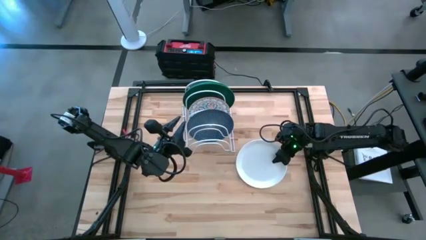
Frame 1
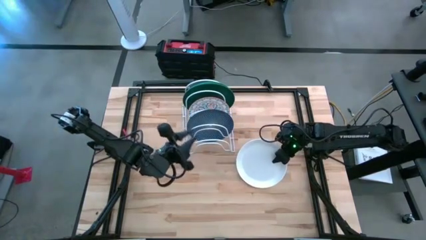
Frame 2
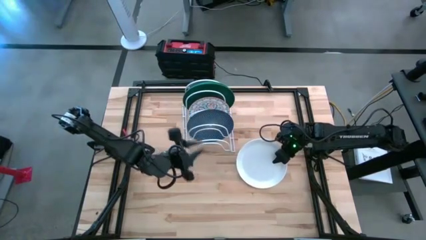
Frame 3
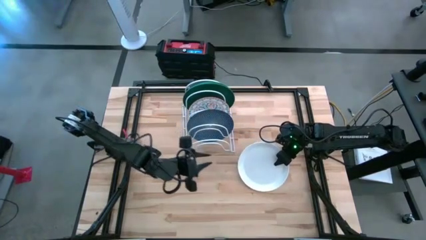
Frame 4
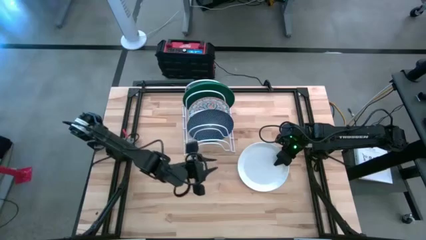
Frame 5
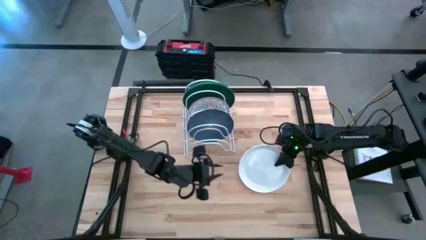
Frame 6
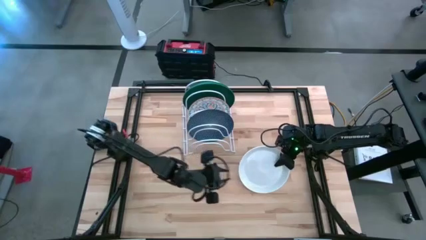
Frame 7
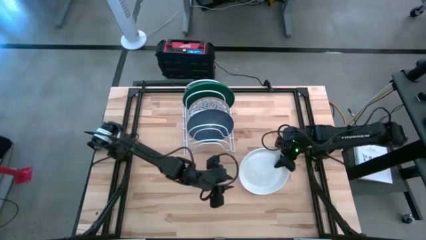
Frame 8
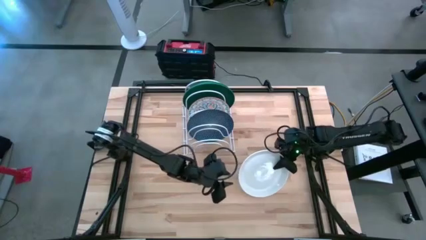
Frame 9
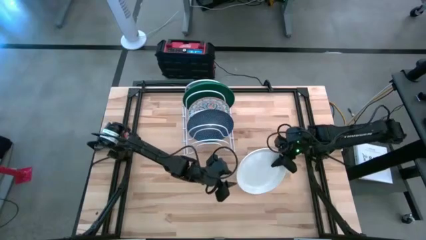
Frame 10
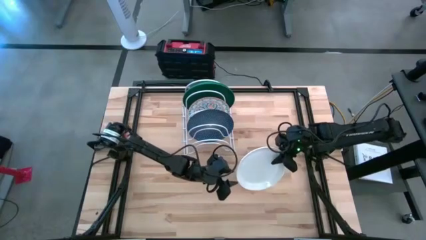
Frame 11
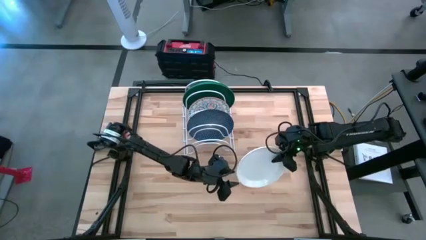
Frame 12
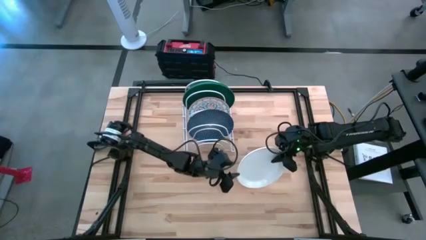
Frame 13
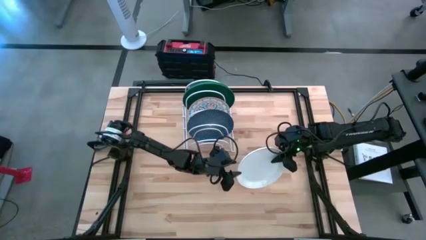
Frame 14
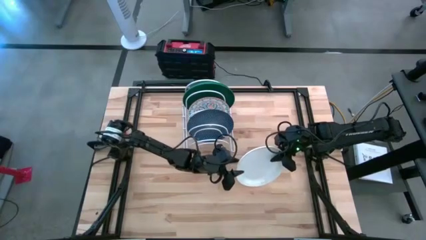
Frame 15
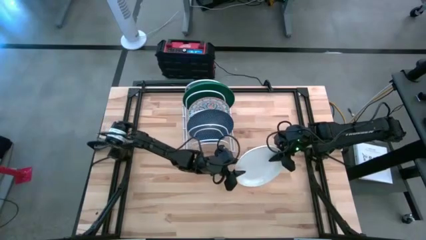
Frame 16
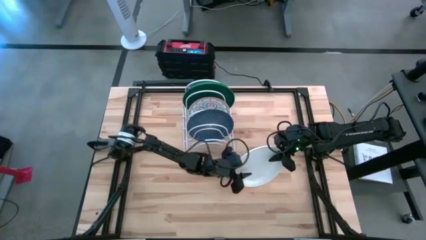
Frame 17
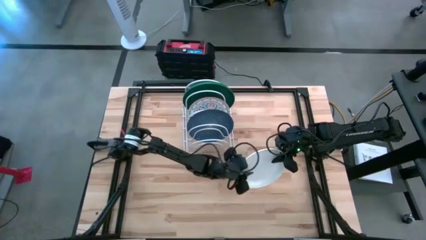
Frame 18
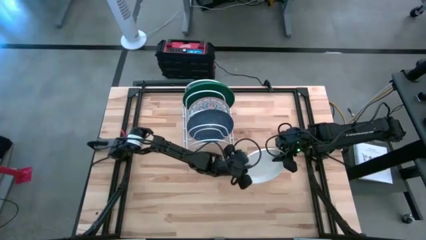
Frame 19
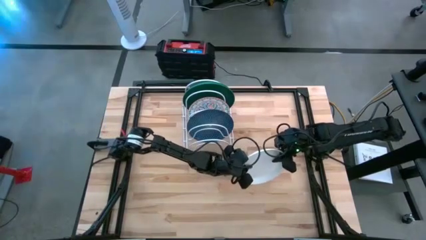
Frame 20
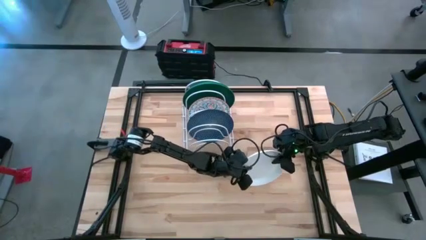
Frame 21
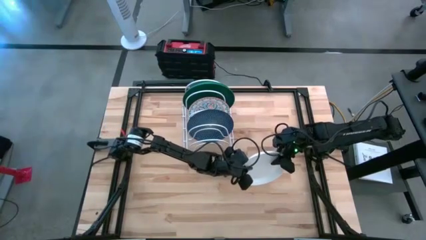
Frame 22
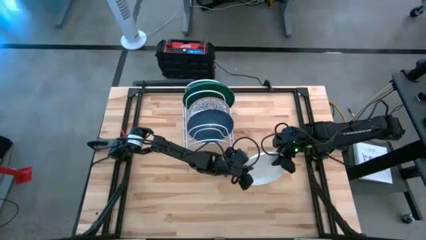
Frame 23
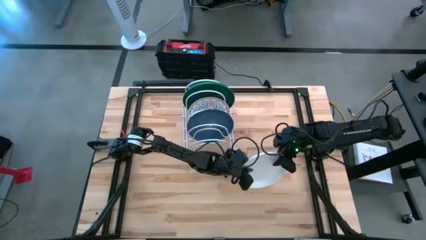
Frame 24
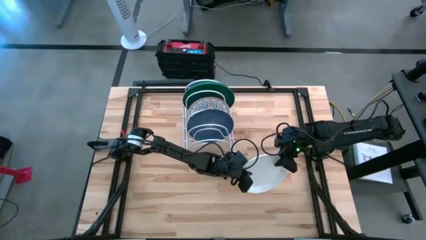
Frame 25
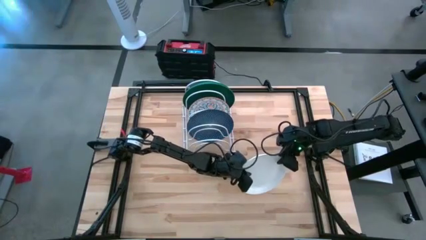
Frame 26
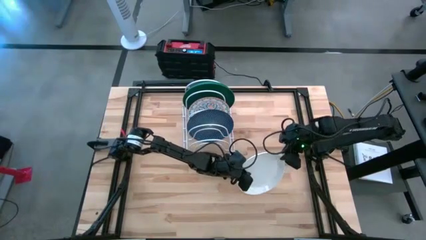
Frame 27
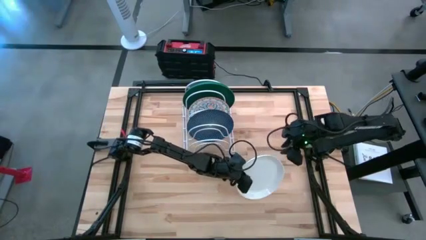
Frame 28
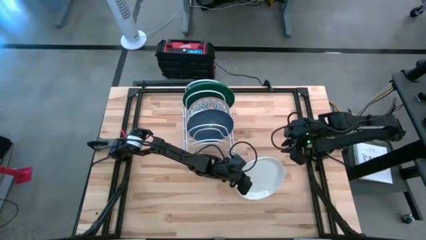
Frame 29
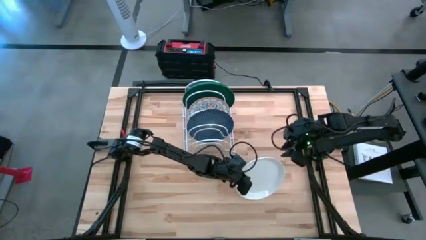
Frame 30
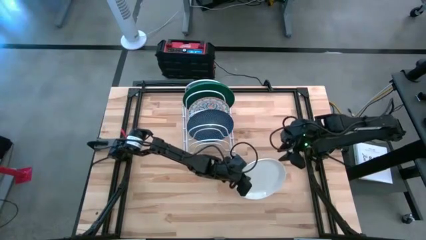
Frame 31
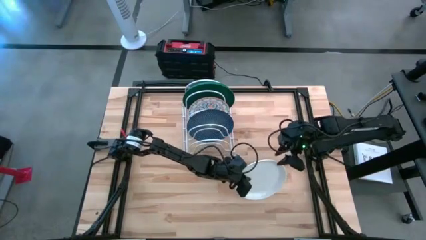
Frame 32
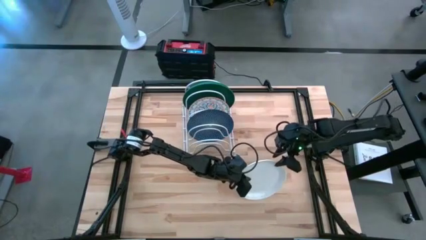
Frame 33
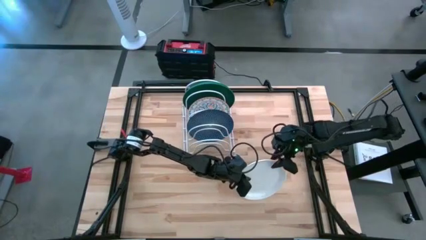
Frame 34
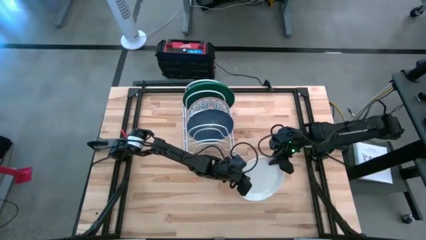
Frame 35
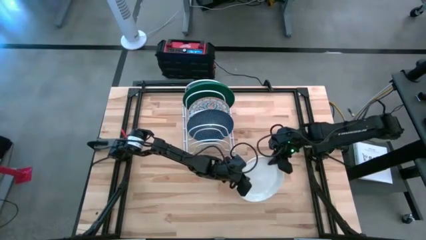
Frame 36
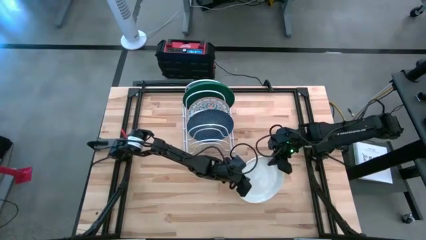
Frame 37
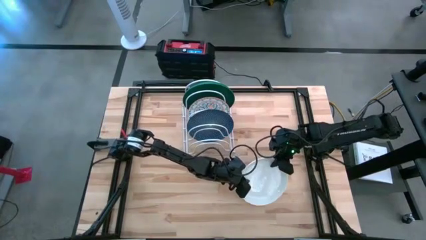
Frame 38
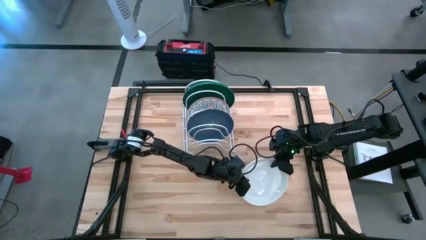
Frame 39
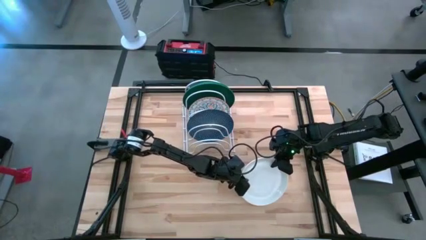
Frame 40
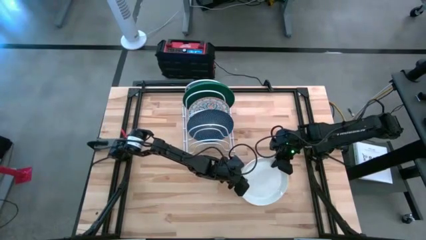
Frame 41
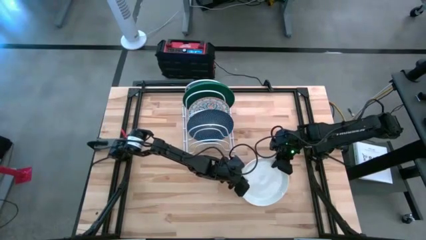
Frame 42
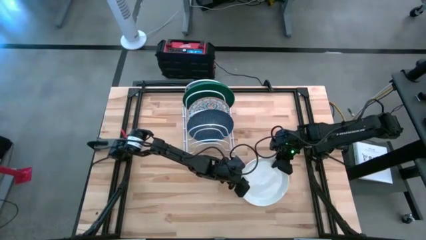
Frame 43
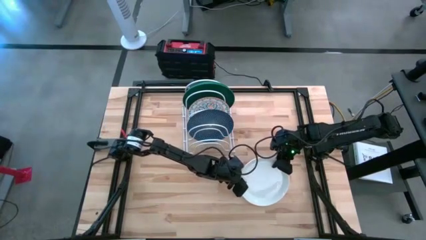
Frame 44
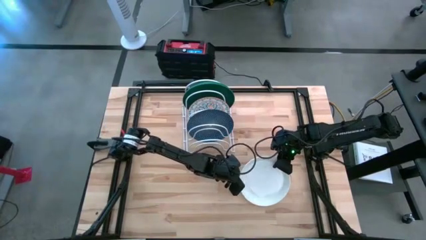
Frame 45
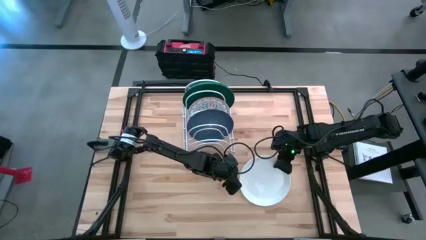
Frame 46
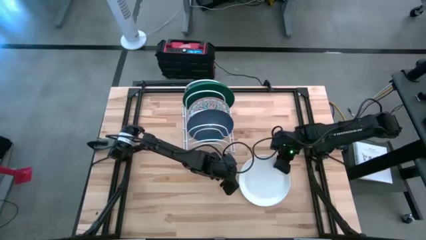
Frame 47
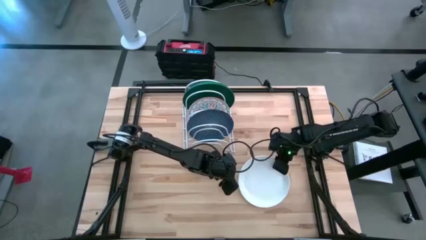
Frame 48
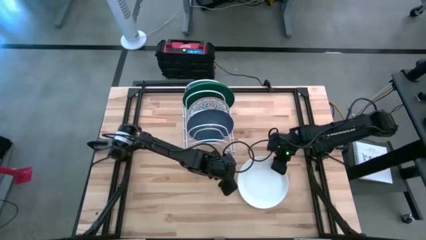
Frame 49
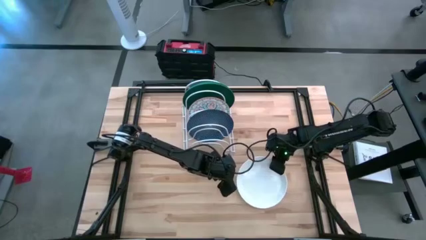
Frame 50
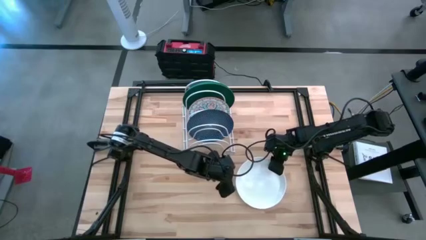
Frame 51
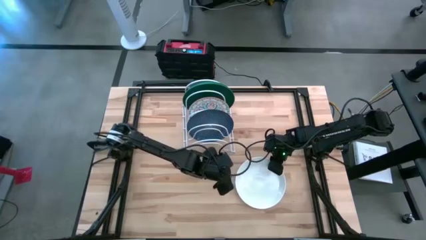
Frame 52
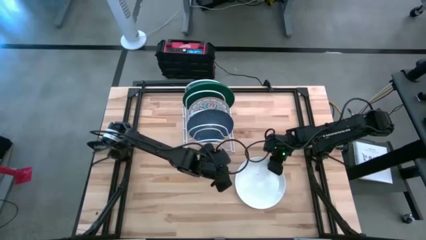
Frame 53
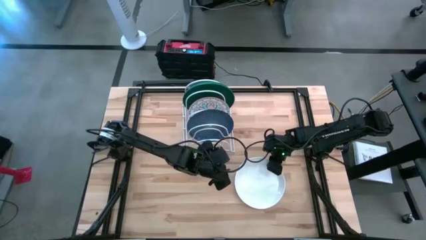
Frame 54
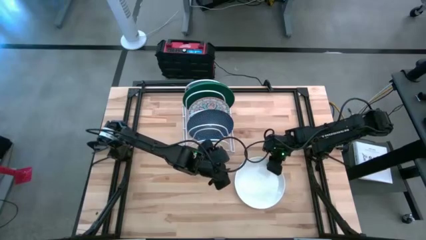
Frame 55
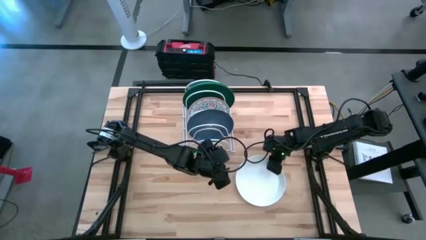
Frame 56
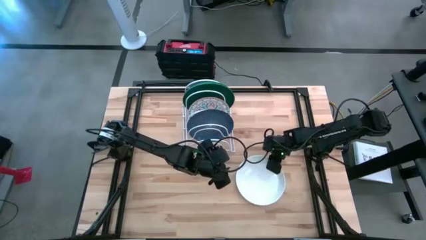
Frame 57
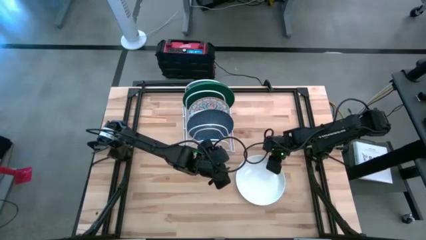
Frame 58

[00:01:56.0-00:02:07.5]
Task: Sort dishes
Remove the white plate from the dish rack

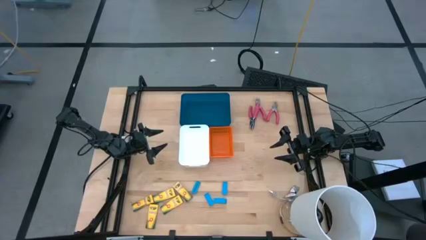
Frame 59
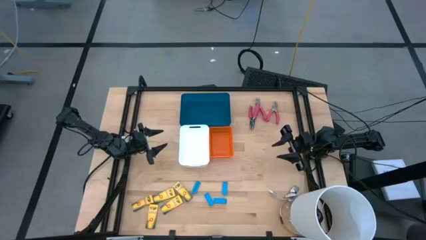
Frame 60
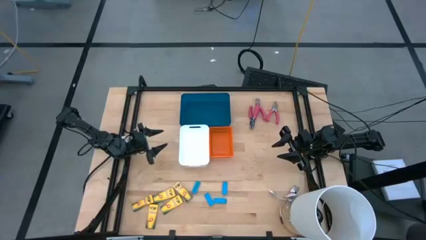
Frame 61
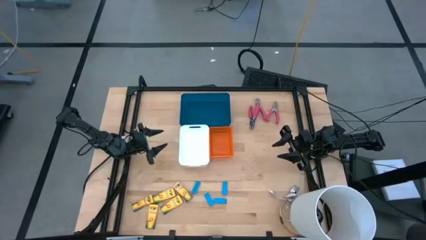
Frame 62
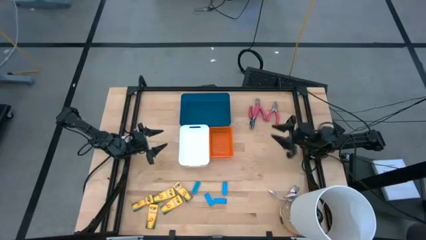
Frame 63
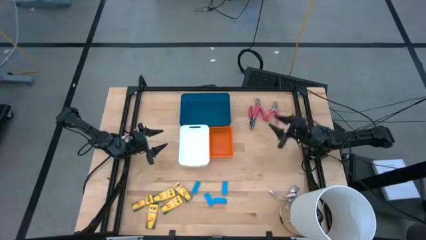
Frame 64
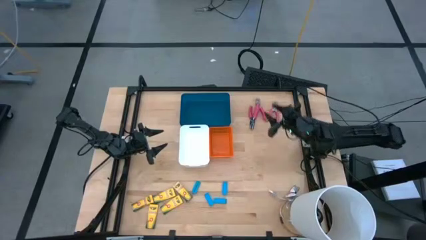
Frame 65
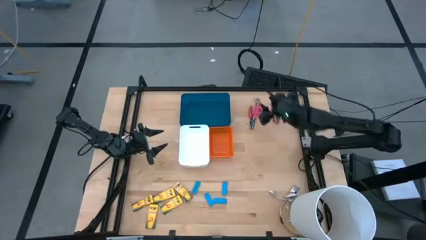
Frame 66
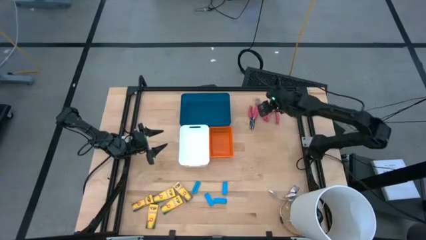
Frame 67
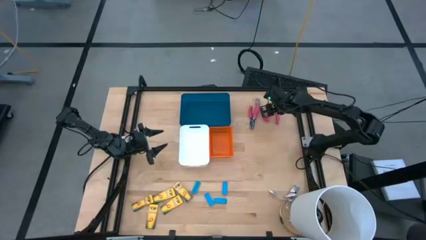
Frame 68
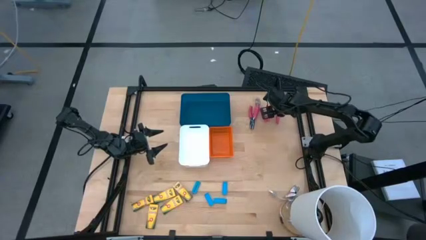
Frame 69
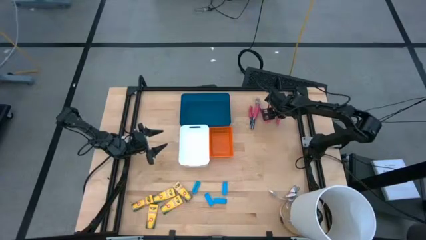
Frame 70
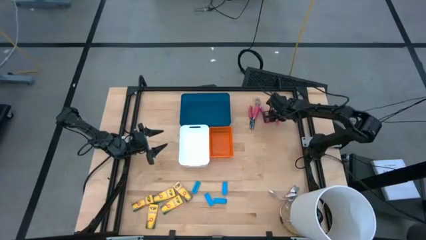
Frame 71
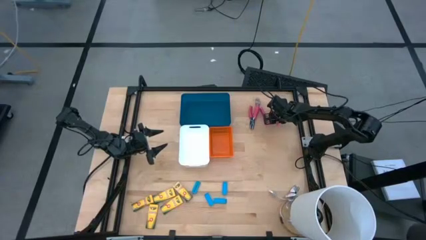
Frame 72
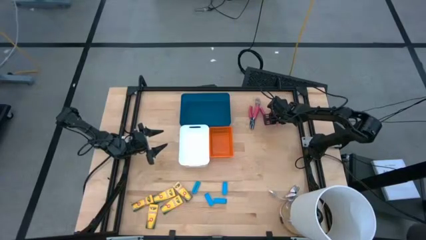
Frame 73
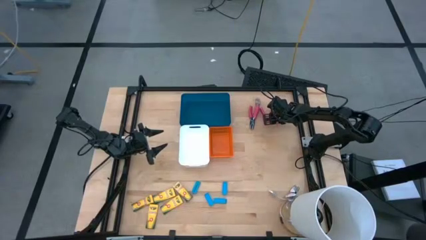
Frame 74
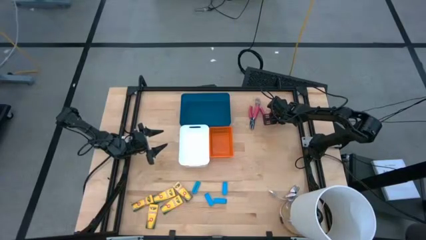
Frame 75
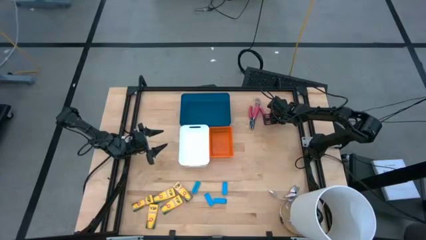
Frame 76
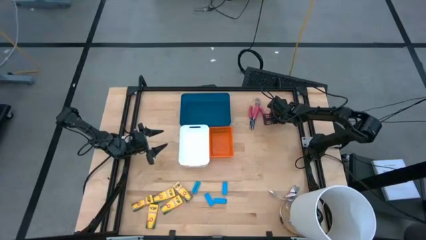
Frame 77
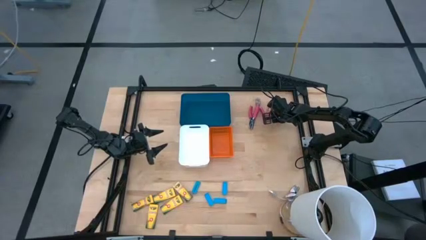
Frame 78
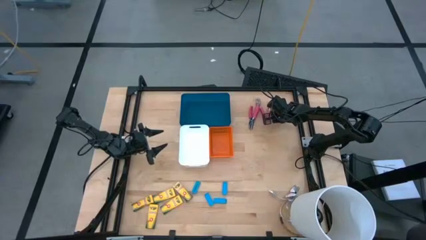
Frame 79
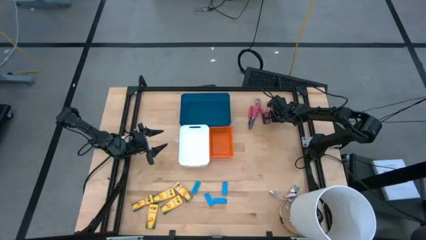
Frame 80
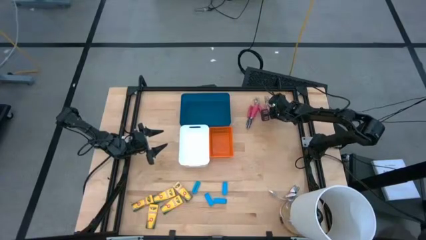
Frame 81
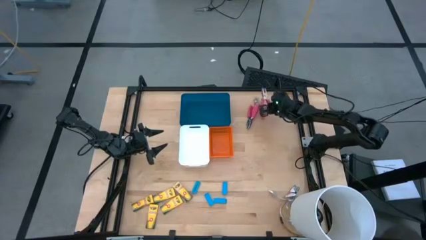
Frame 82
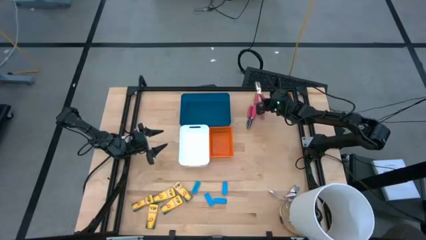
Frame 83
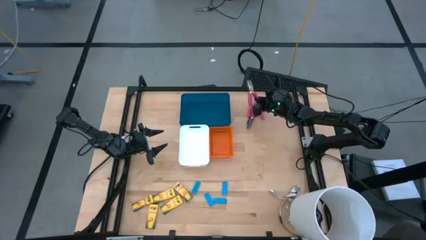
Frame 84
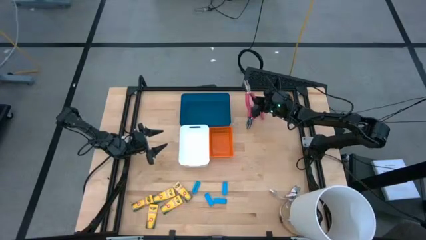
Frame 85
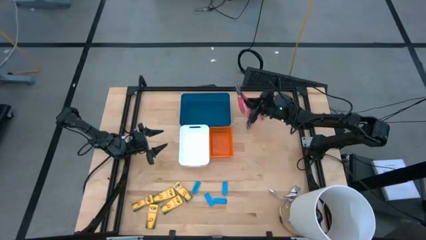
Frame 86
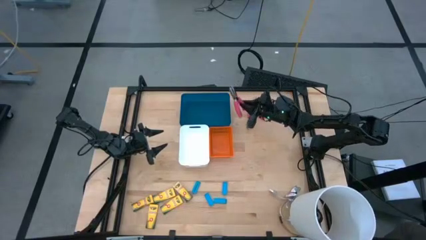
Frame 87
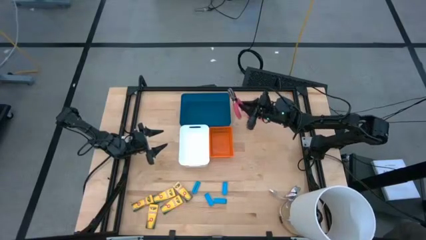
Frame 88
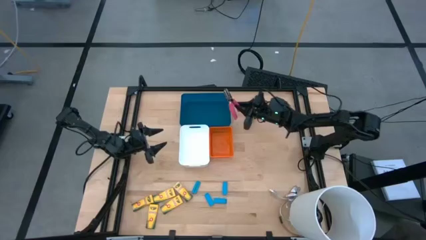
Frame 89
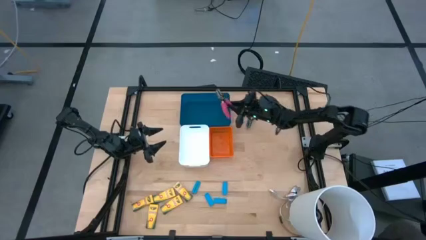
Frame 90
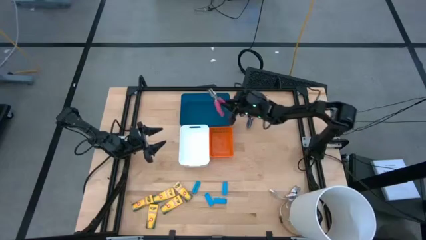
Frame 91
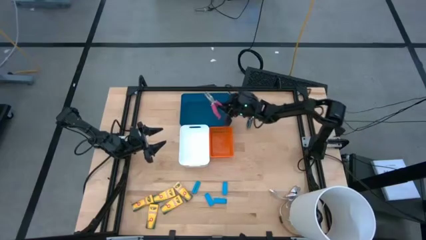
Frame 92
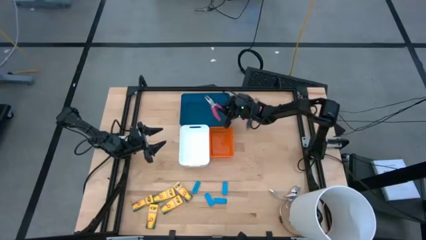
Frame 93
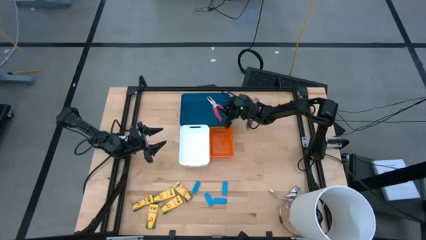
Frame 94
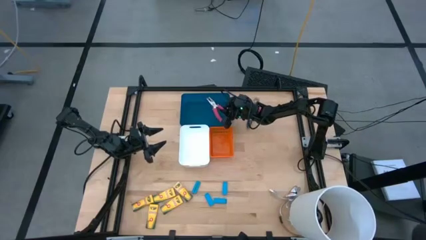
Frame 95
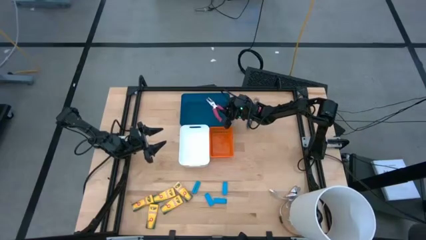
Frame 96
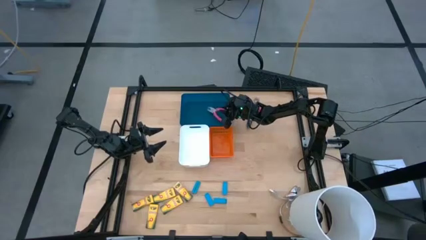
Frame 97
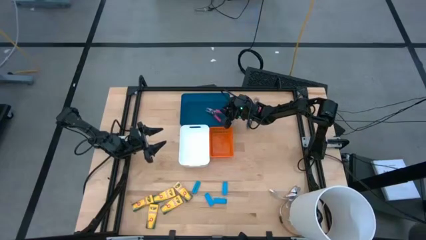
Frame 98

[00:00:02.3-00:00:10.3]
Task: Pick & Place School Supplies
Put the pink hole puncher into the blue bin
